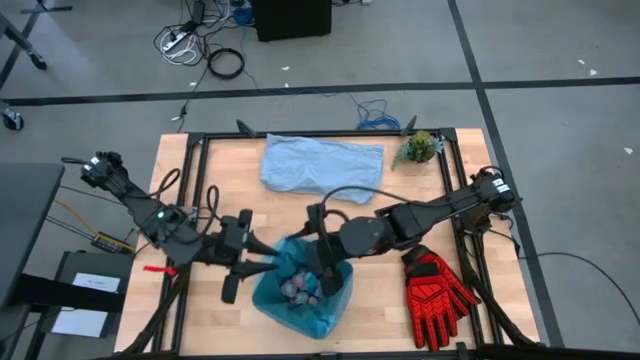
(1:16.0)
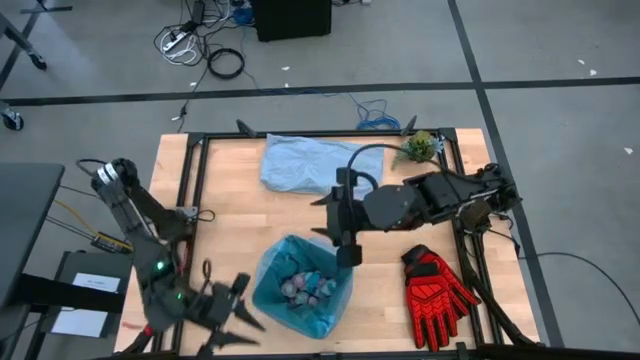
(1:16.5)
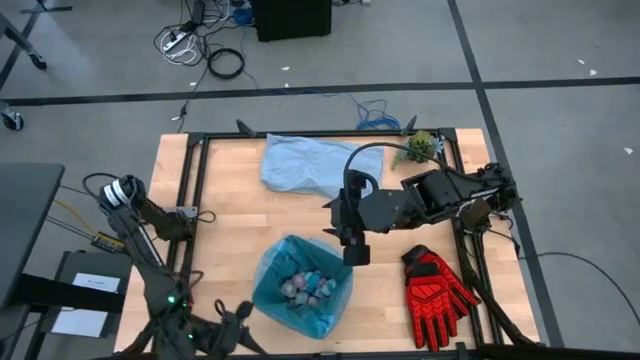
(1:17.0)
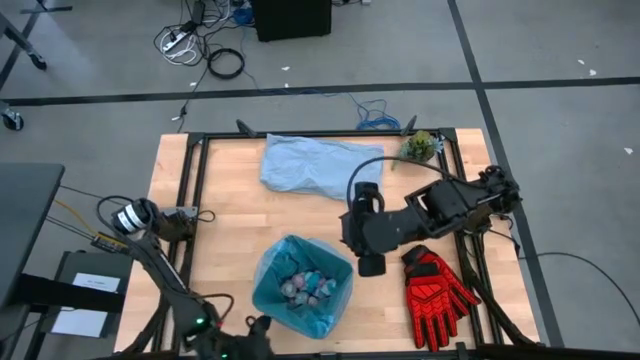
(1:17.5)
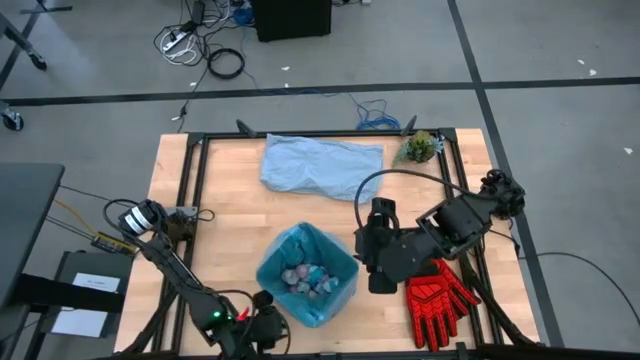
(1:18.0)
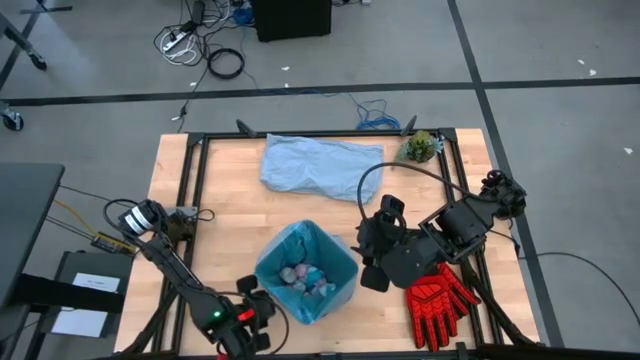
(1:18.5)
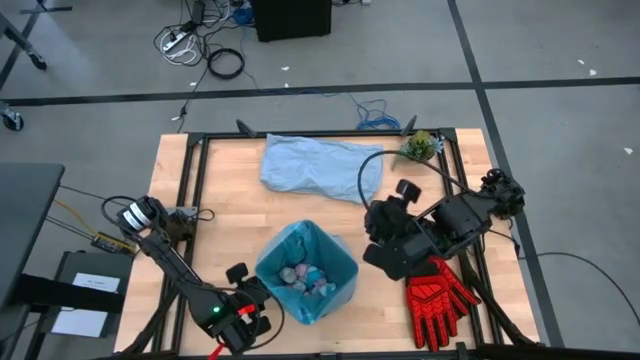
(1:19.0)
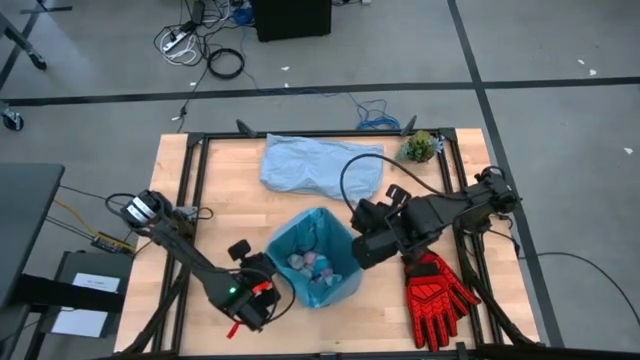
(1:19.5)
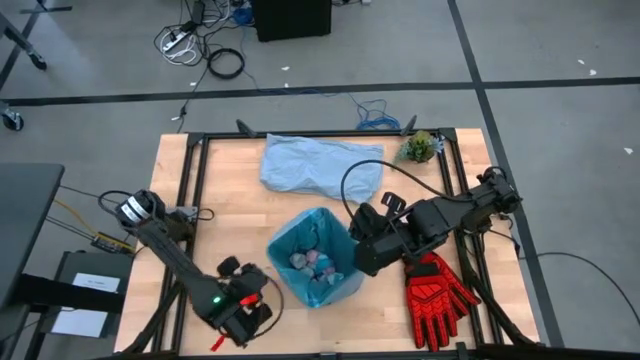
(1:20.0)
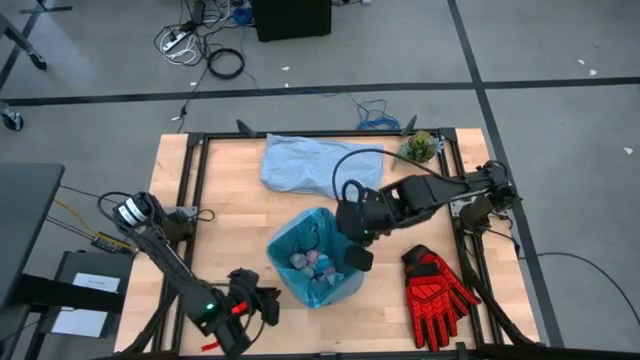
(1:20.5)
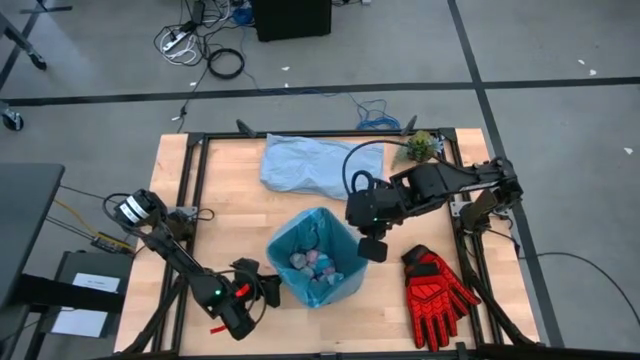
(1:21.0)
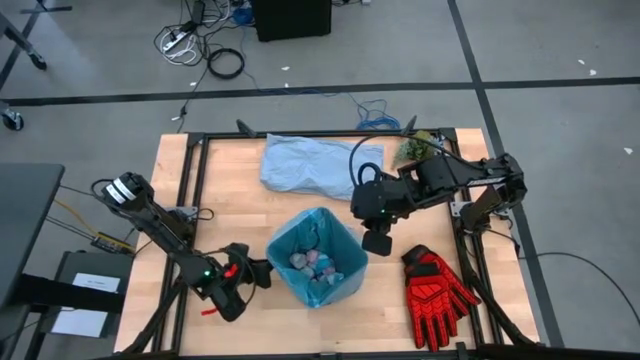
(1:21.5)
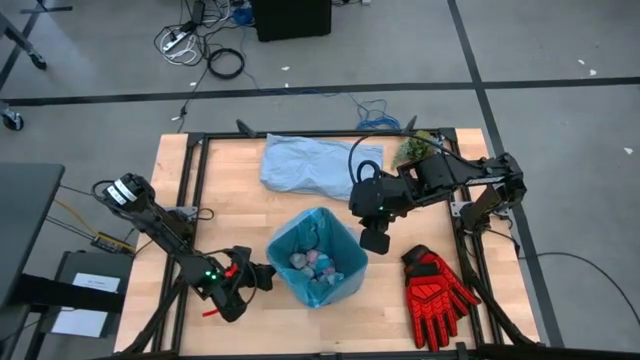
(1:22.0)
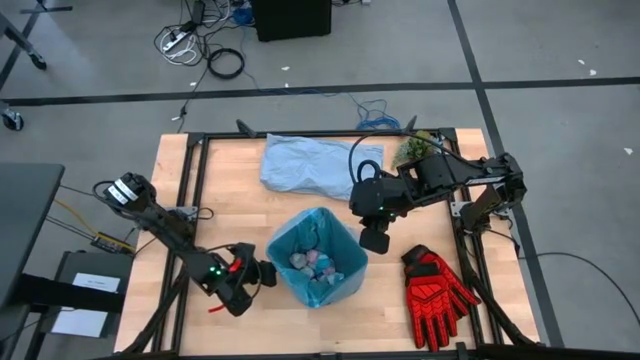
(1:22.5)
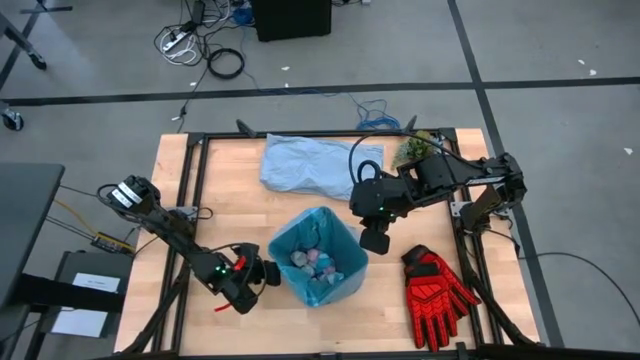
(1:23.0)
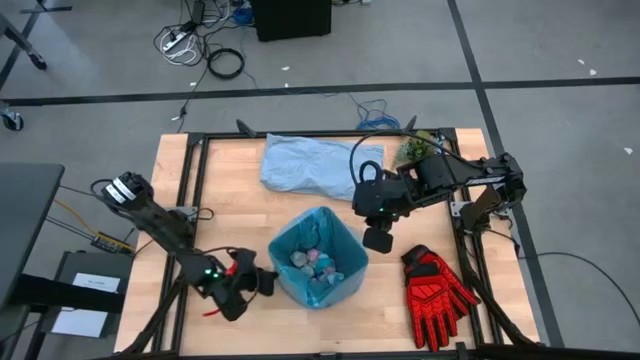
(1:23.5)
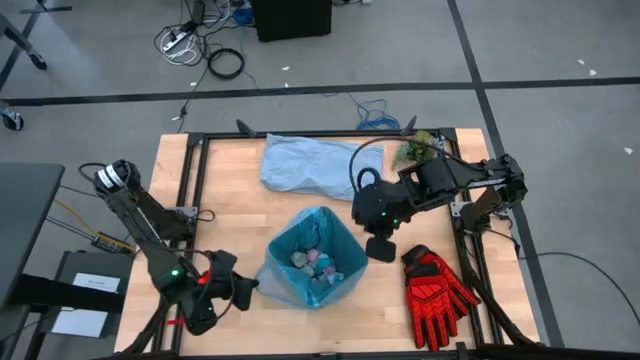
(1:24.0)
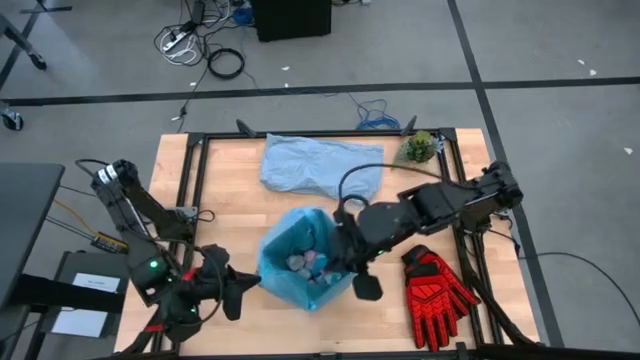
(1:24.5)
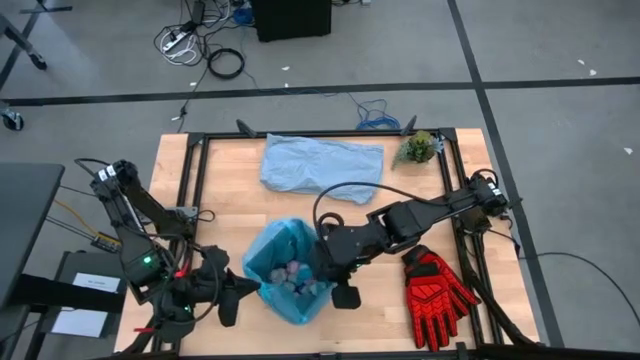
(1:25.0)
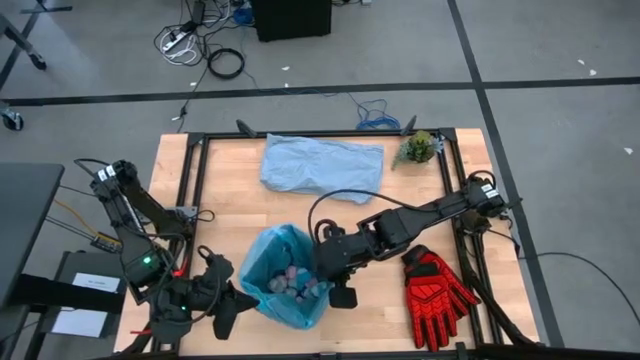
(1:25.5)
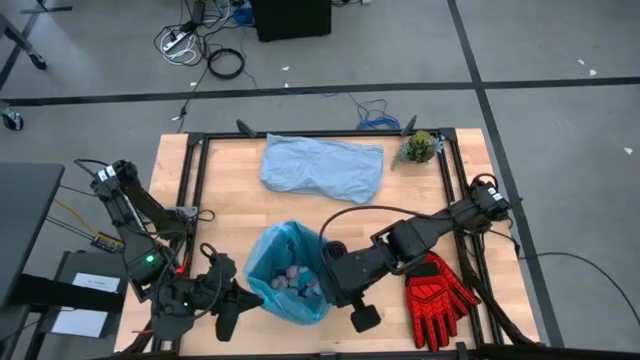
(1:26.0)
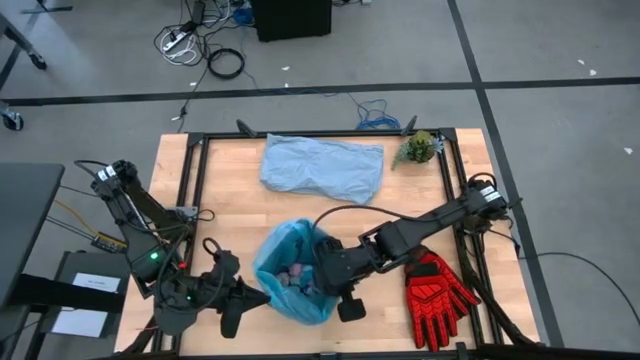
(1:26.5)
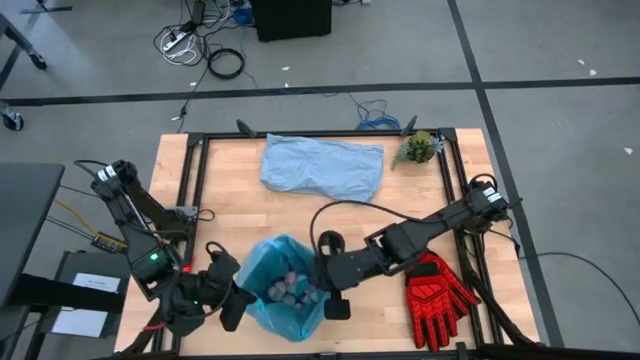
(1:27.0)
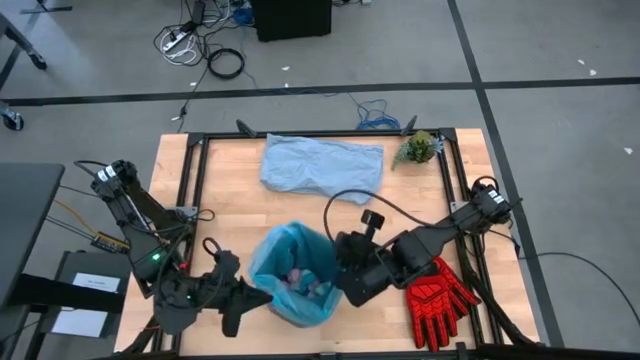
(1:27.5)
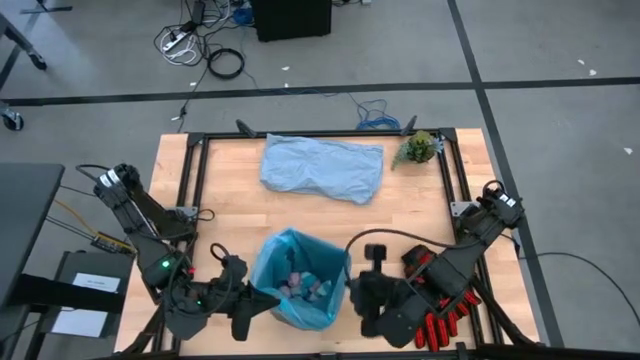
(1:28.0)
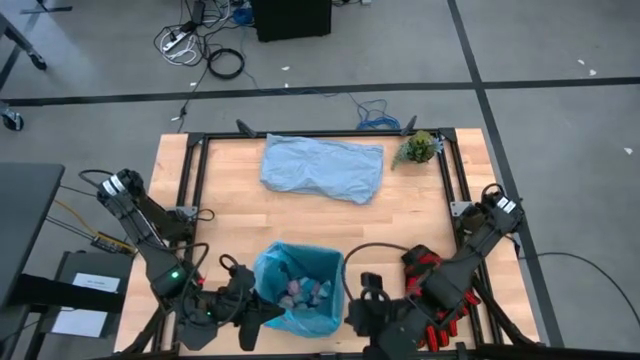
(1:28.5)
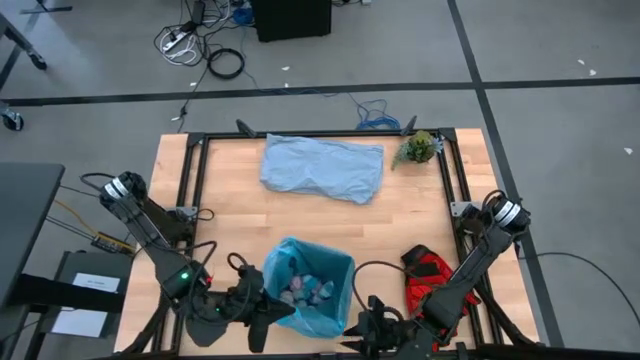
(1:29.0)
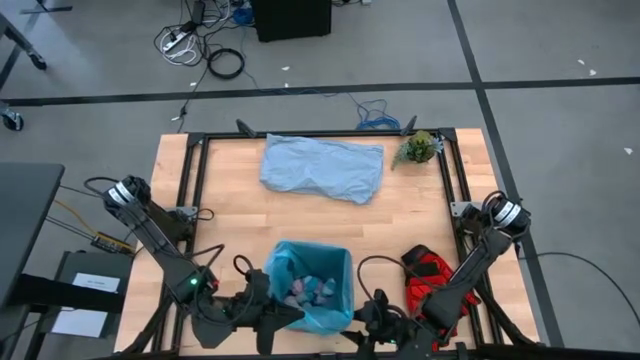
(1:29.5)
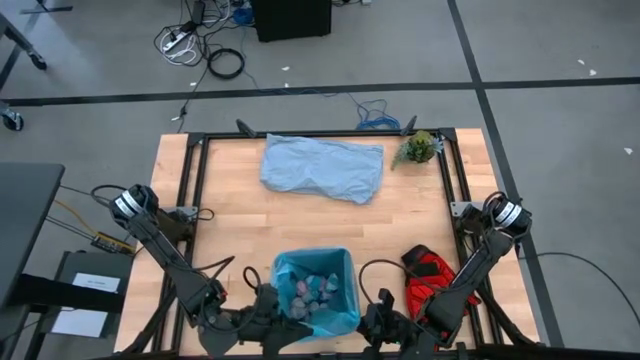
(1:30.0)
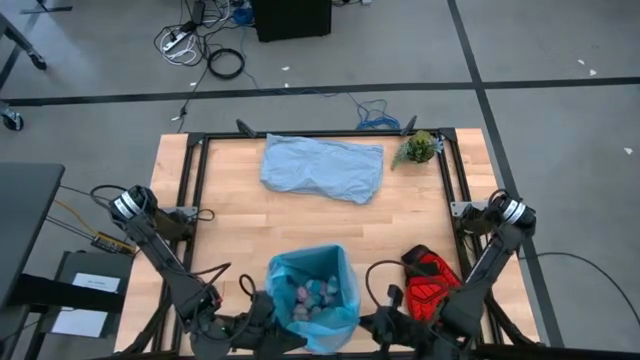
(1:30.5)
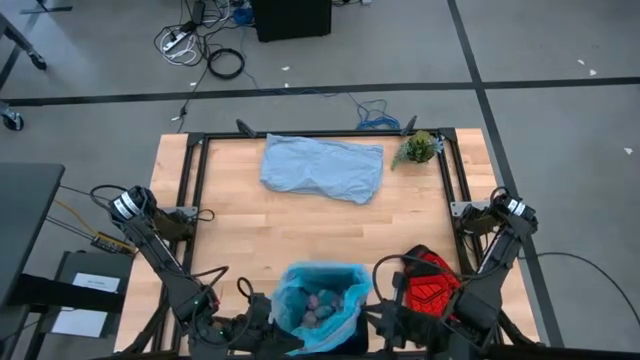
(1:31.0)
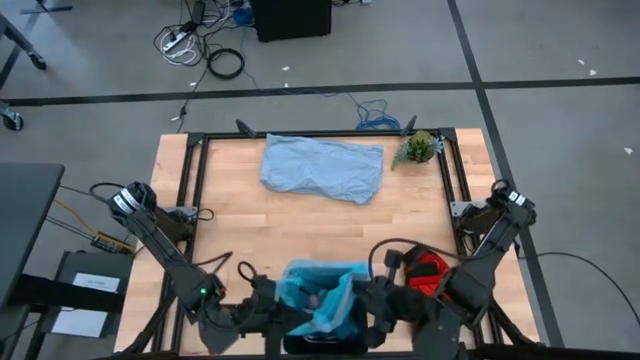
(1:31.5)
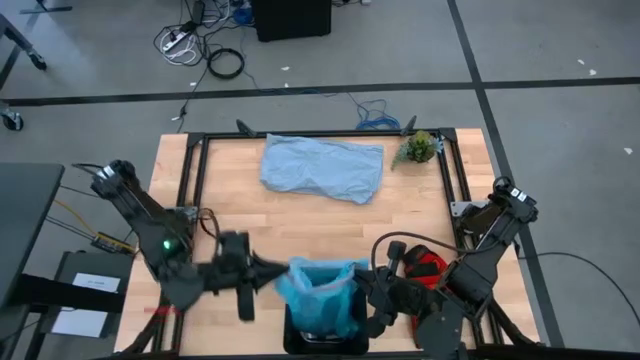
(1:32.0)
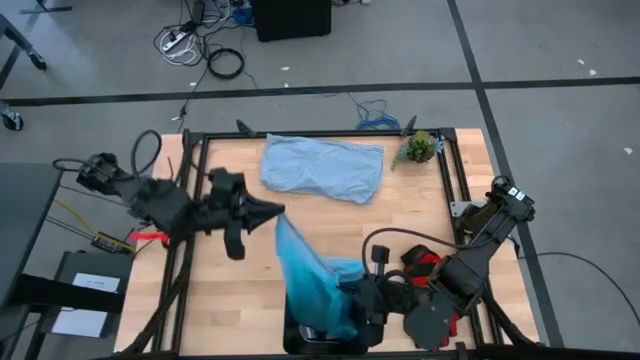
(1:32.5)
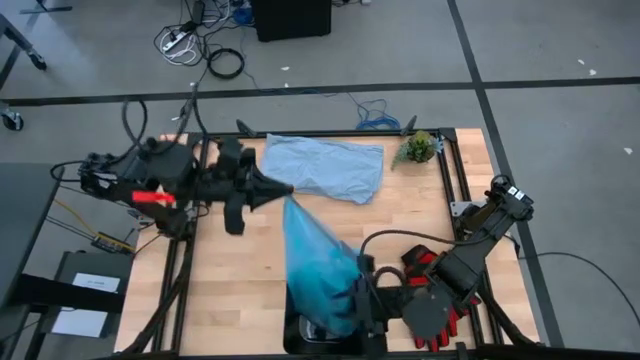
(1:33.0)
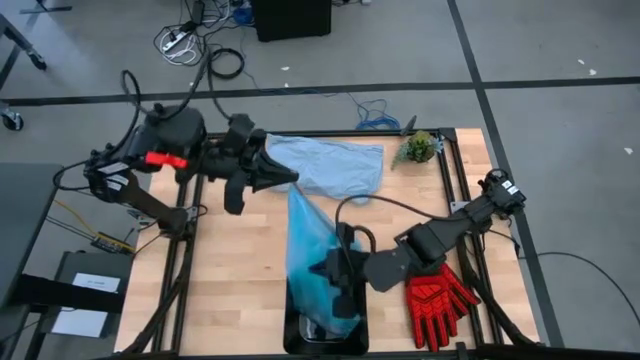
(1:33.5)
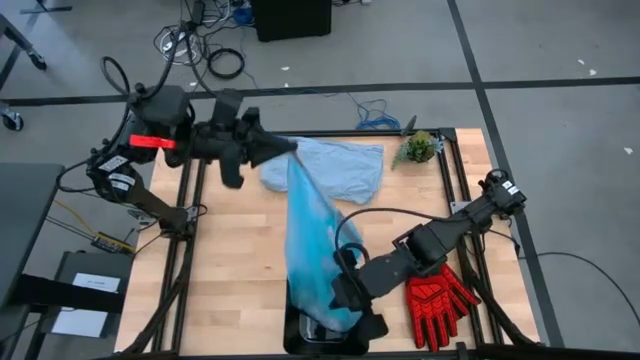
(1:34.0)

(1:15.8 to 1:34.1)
Task: place trash/remove bag and relplace
Close the light blue trash bag

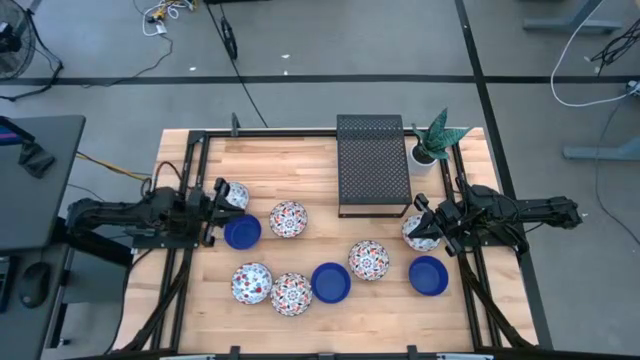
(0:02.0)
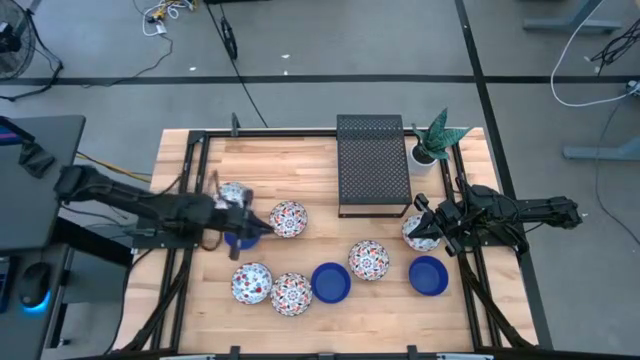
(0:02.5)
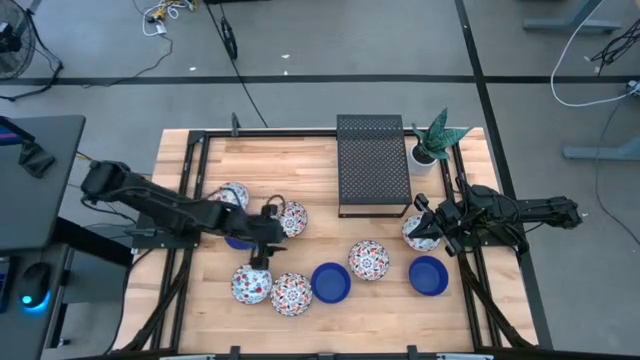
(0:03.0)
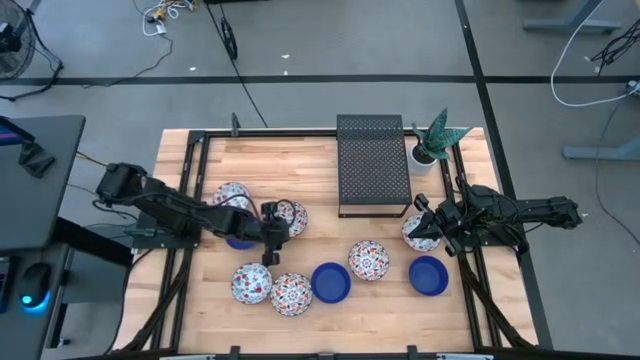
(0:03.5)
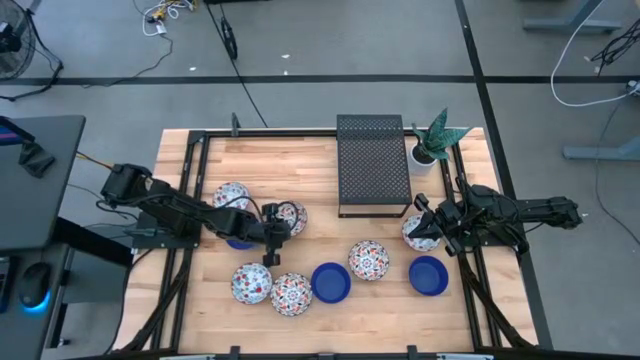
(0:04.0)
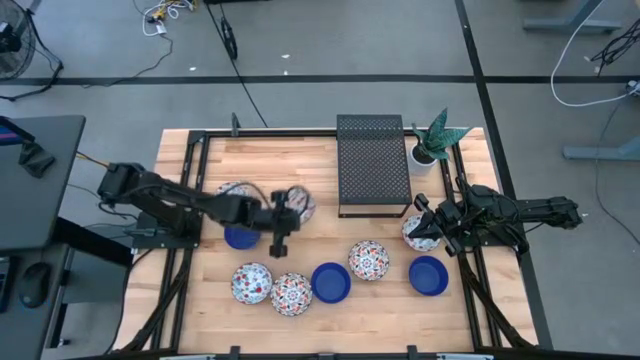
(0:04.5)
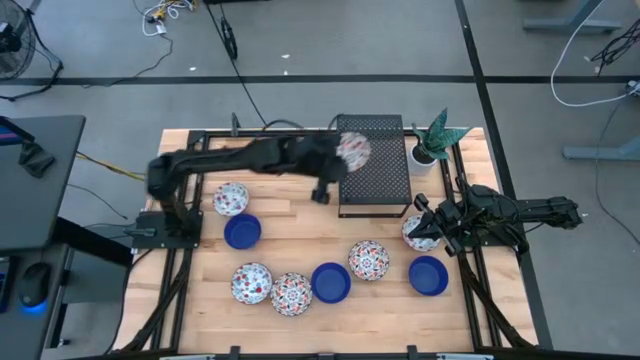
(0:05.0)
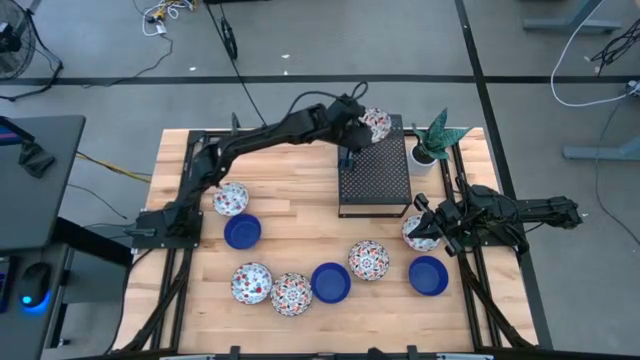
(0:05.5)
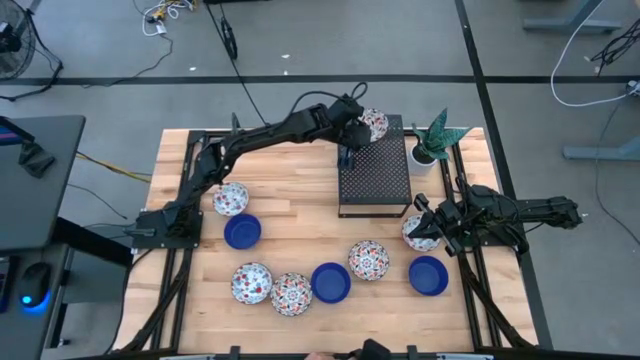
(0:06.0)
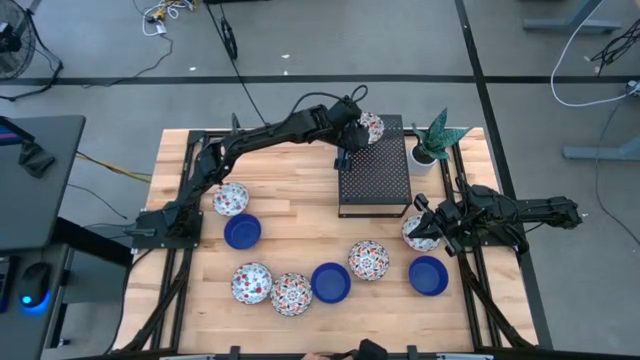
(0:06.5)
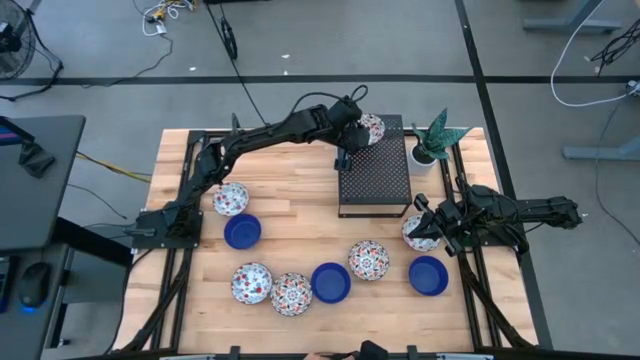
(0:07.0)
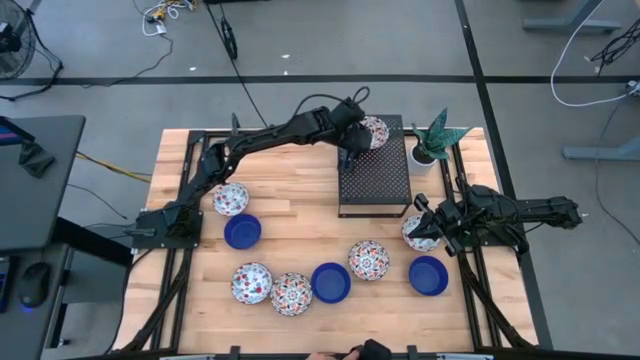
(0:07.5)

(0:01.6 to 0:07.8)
Task: Pick & Place Mini bowls
Put the top orange patterned bowl on the shelf
